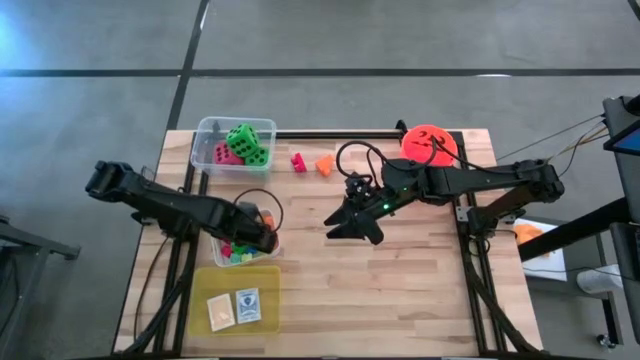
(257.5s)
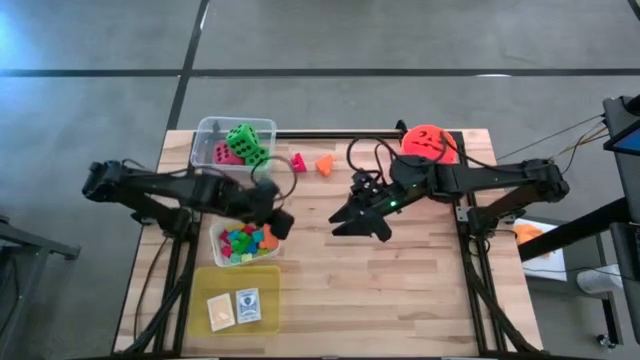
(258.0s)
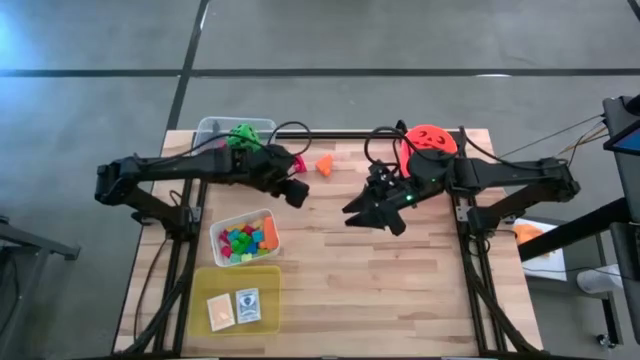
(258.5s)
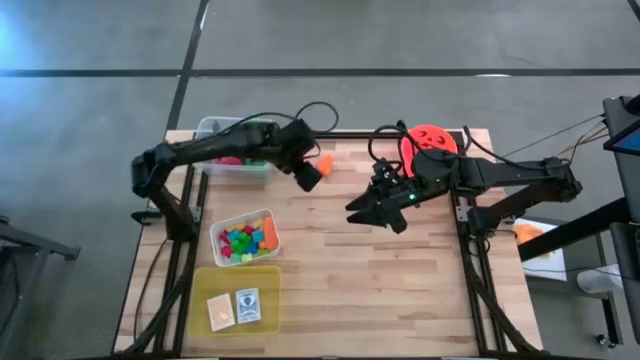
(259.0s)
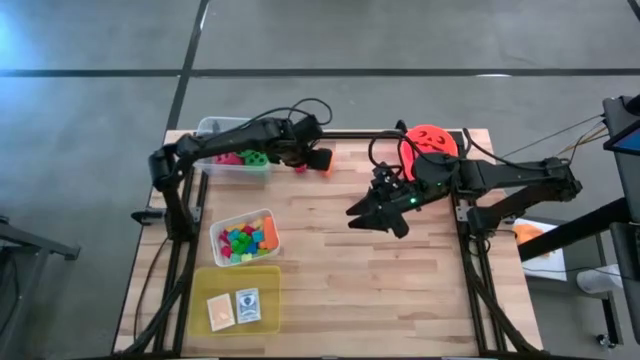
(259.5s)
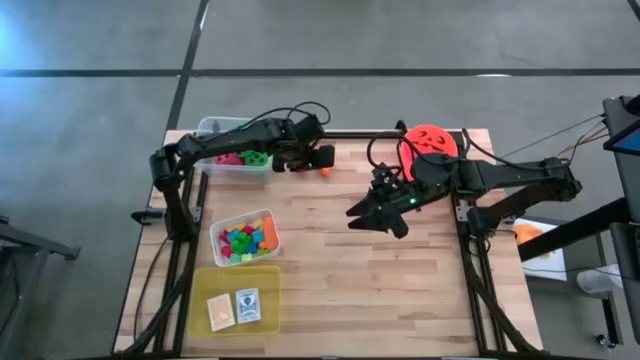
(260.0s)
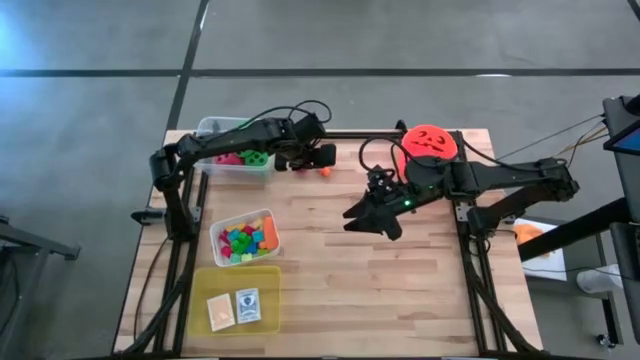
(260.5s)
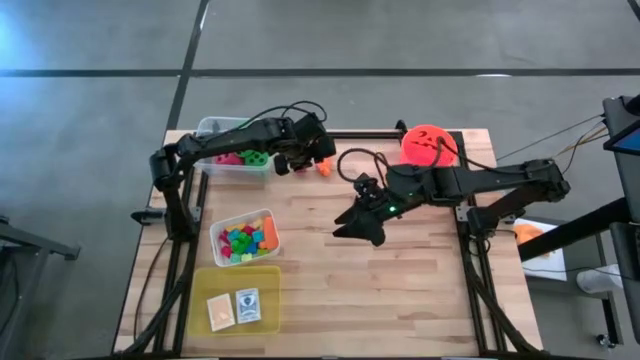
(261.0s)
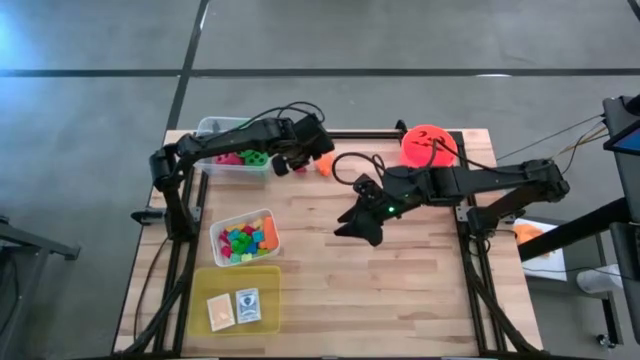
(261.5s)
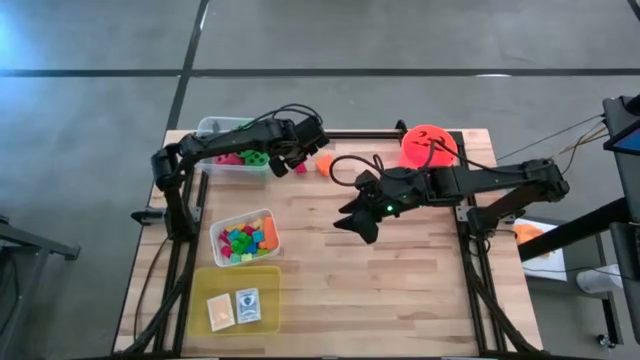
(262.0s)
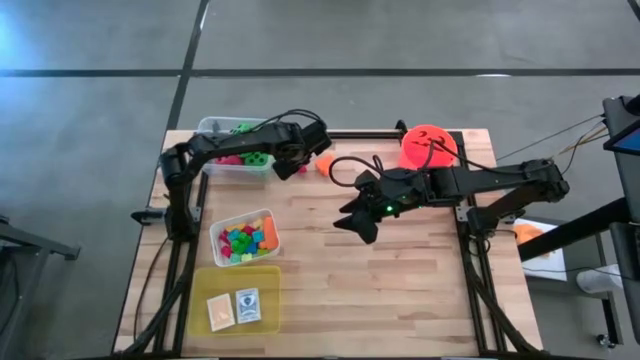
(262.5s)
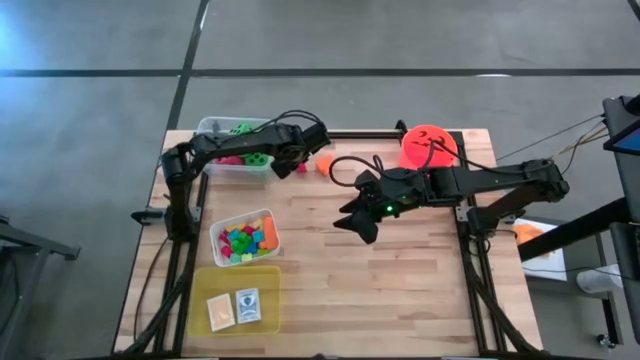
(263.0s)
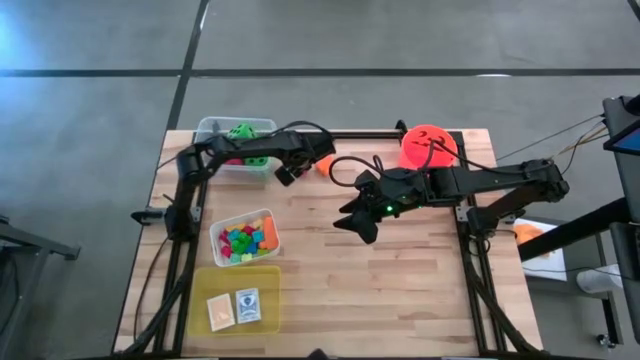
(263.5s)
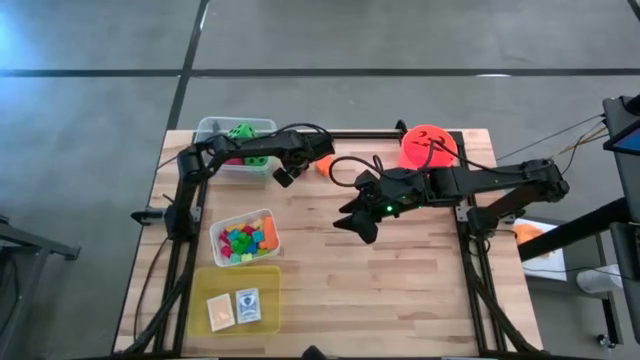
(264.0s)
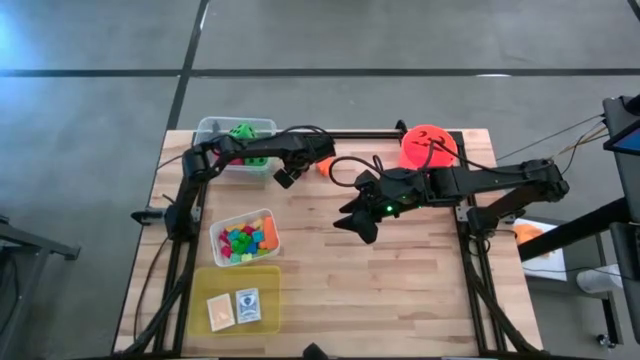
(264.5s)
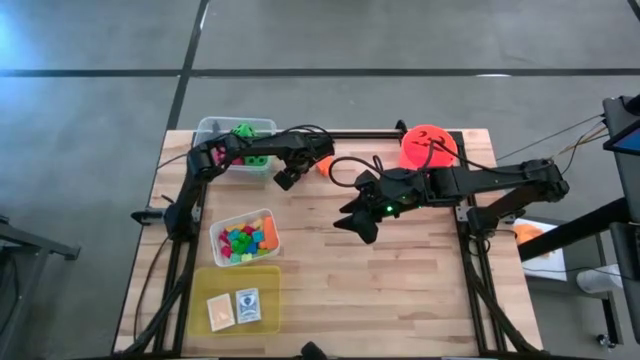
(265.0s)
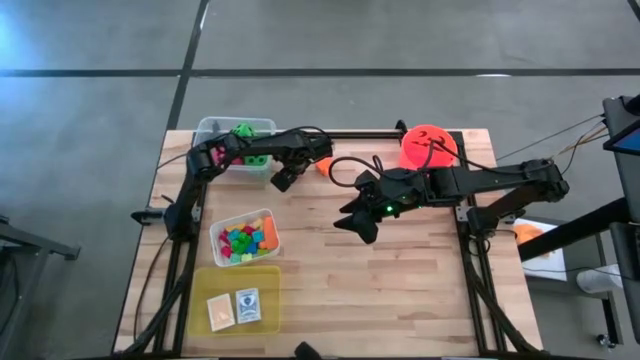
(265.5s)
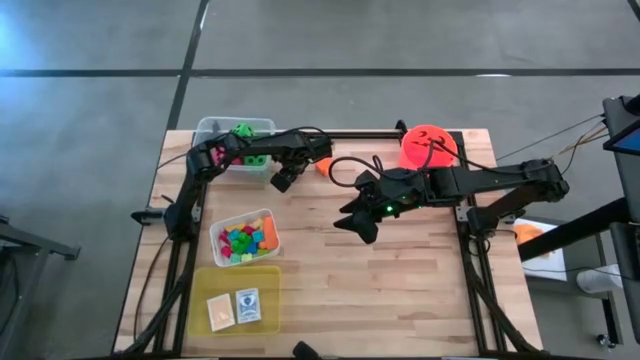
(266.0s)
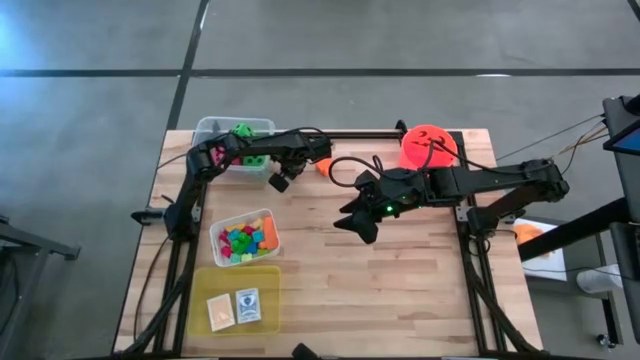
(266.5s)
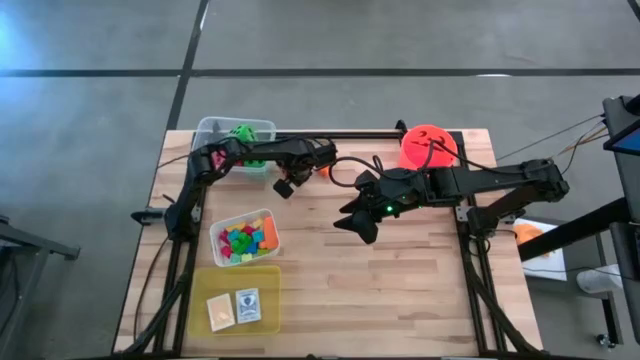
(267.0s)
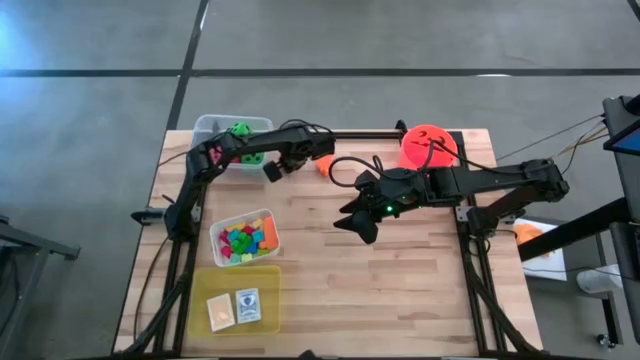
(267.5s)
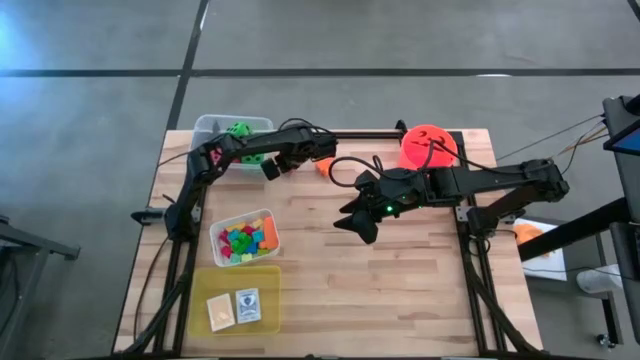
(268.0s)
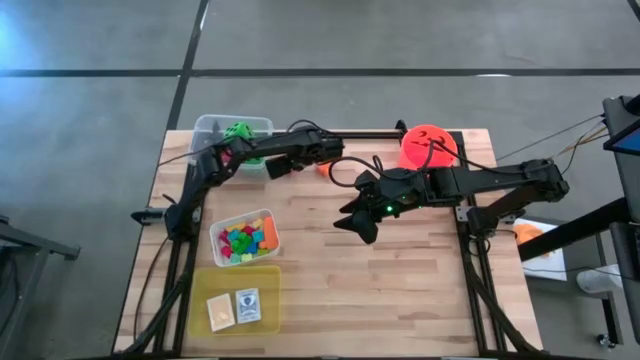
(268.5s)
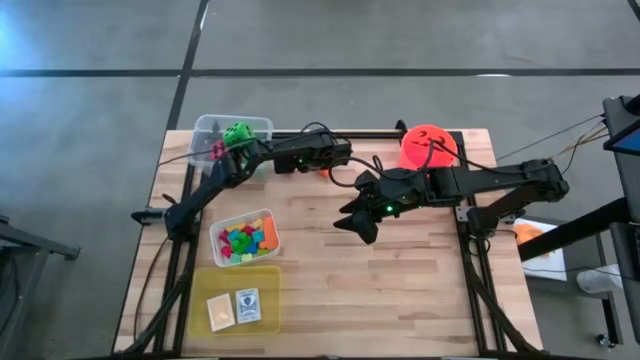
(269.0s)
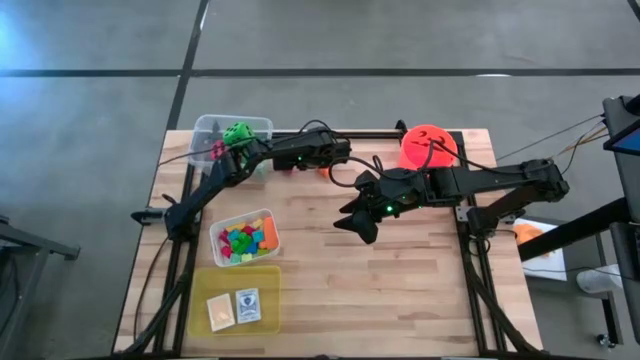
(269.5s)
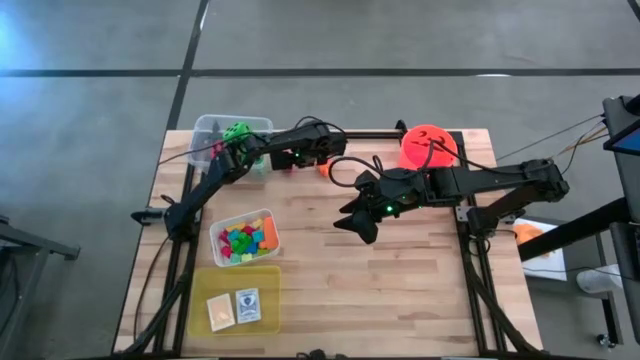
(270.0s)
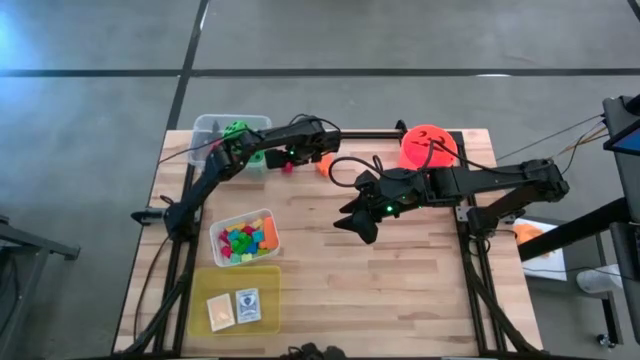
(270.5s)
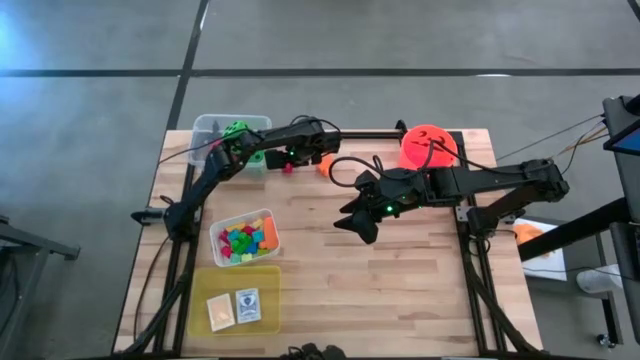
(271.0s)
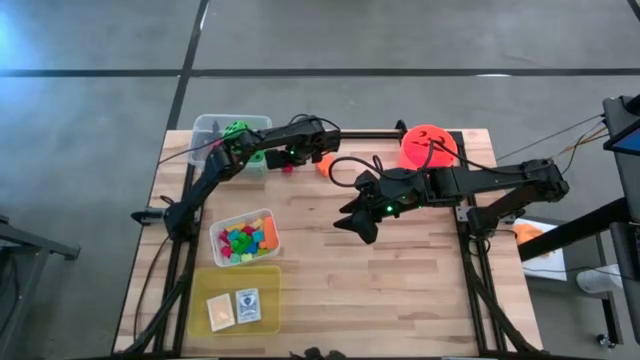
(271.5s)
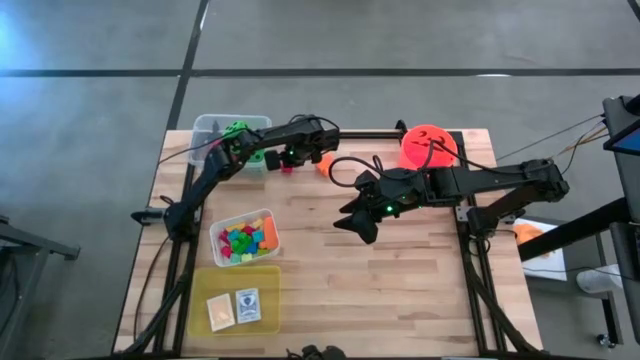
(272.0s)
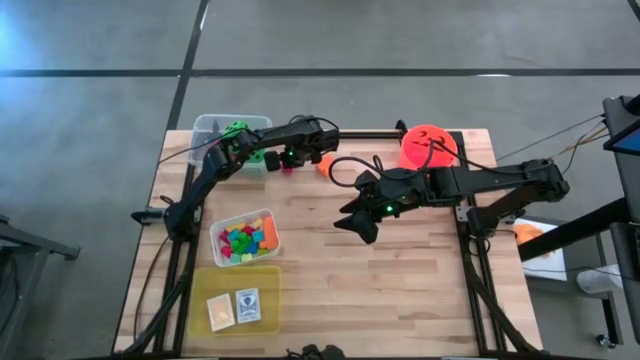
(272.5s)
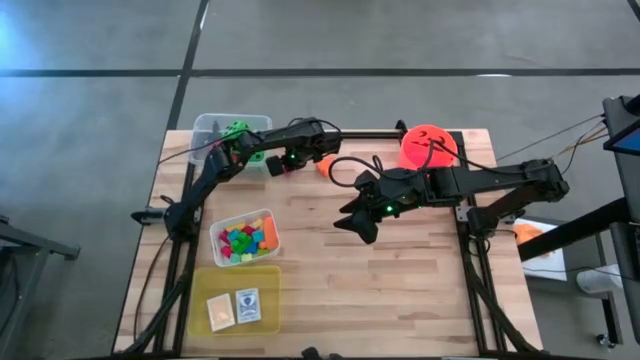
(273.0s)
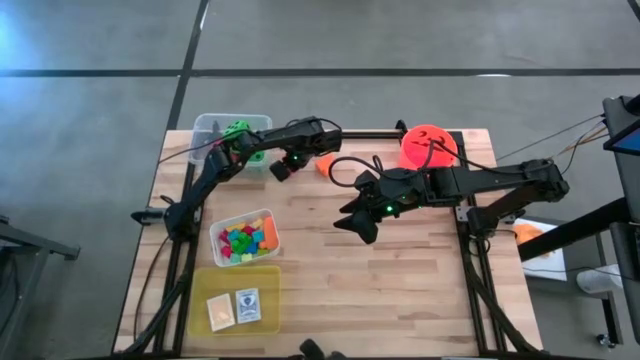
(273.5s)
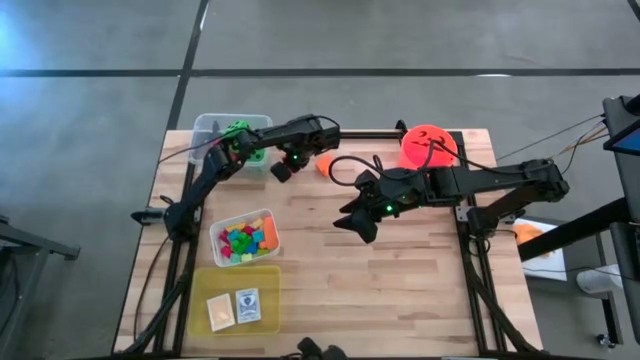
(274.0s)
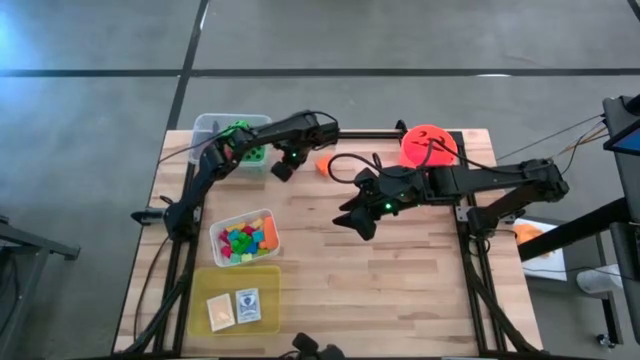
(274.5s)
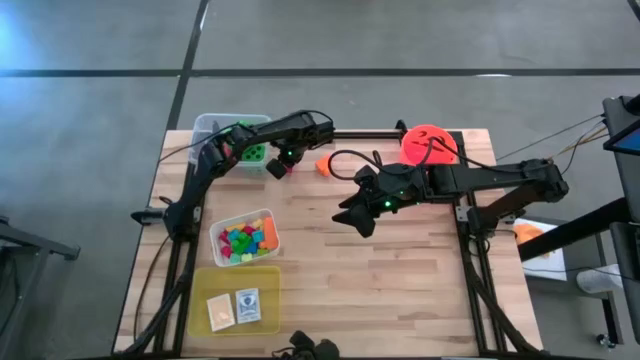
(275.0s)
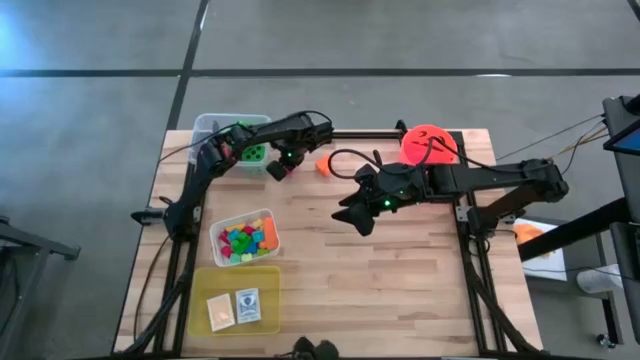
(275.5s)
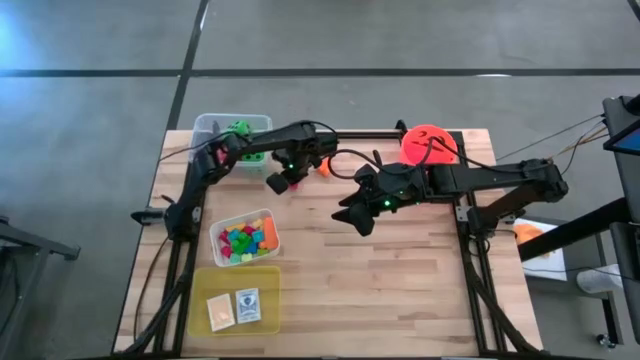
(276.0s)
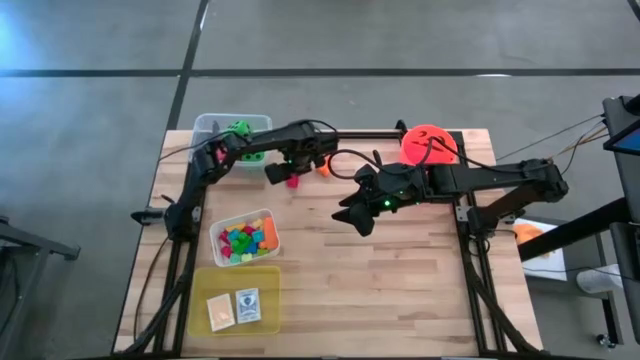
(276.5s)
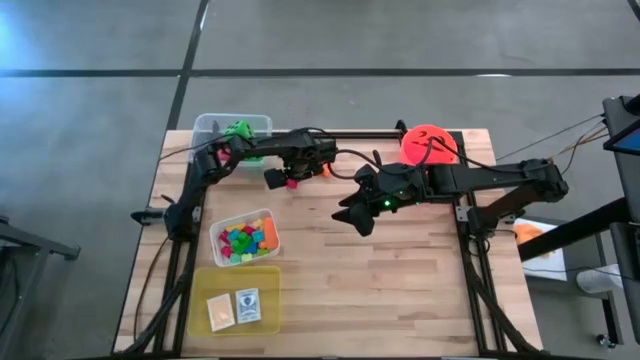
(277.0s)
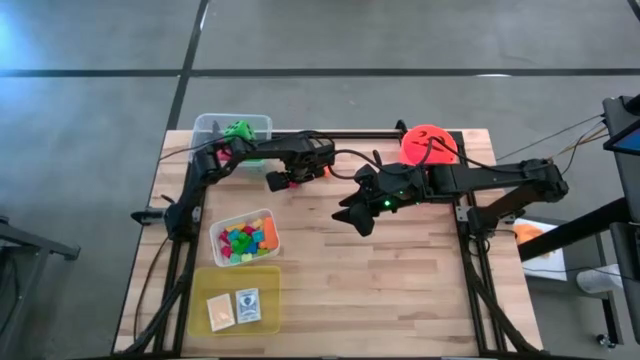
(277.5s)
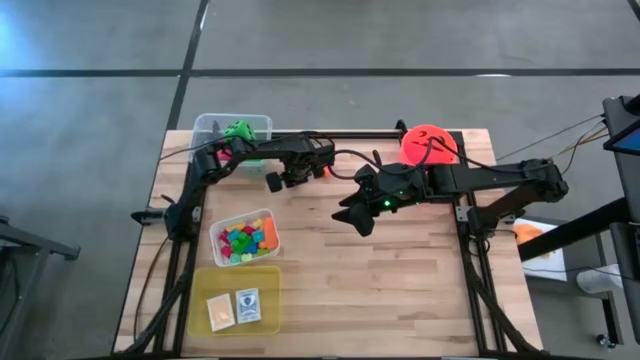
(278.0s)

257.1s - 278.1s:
Task: Pick & Place Toys
Put the red game piece into the white bin
